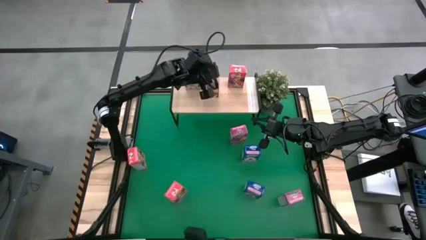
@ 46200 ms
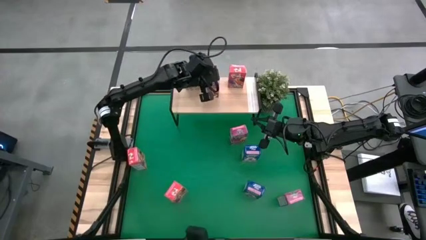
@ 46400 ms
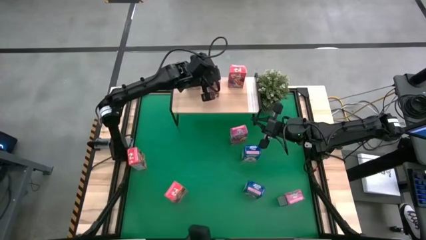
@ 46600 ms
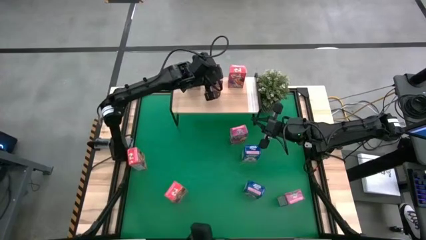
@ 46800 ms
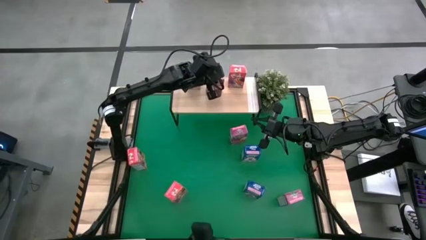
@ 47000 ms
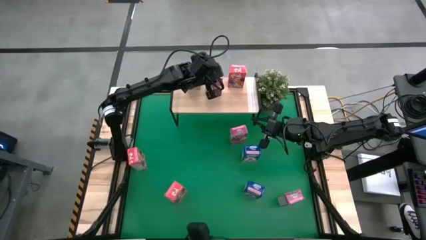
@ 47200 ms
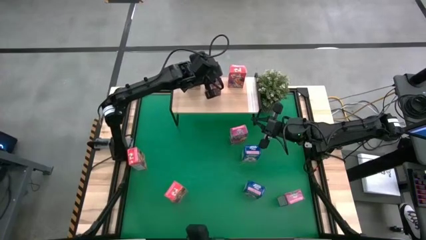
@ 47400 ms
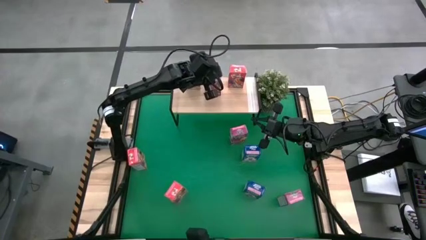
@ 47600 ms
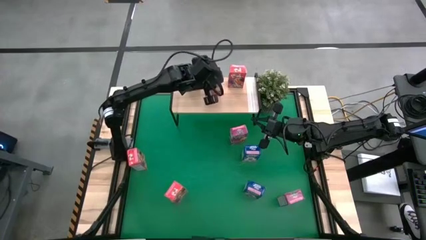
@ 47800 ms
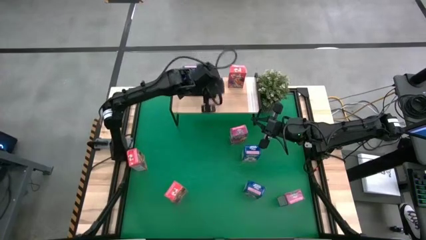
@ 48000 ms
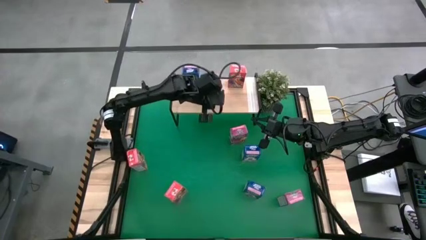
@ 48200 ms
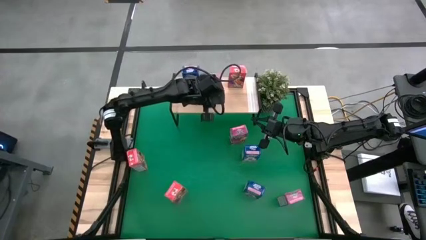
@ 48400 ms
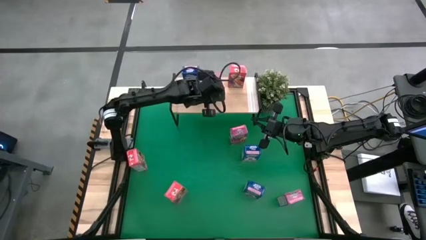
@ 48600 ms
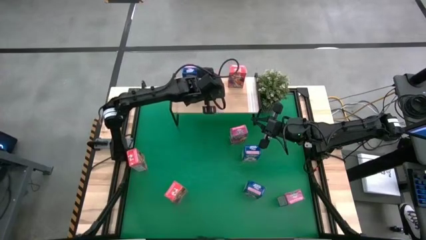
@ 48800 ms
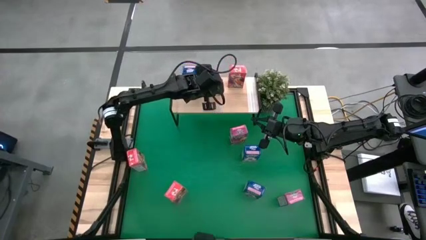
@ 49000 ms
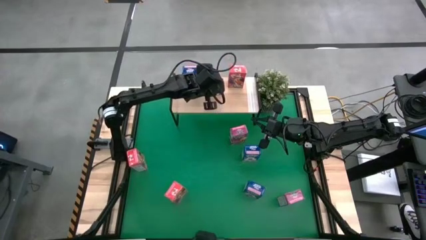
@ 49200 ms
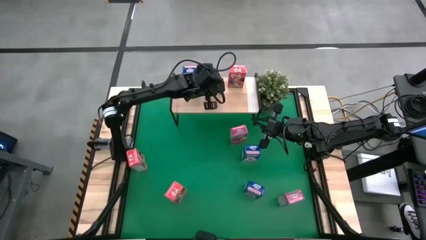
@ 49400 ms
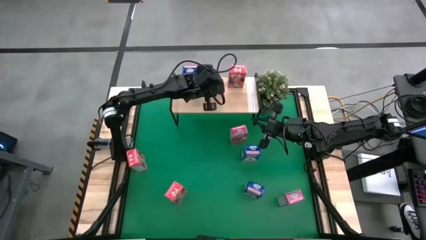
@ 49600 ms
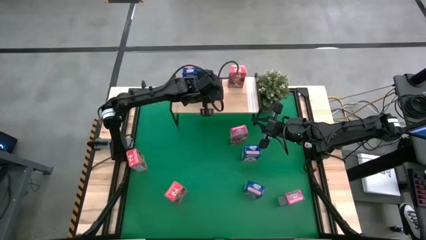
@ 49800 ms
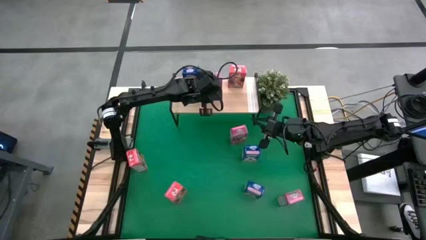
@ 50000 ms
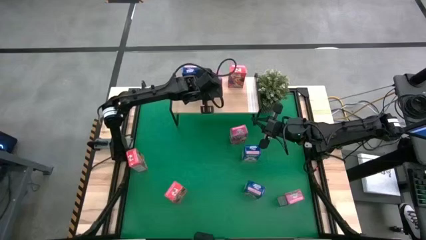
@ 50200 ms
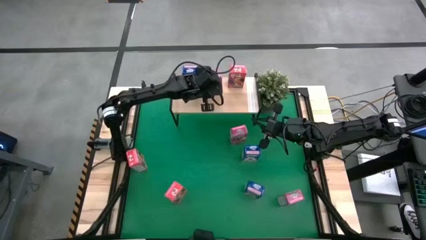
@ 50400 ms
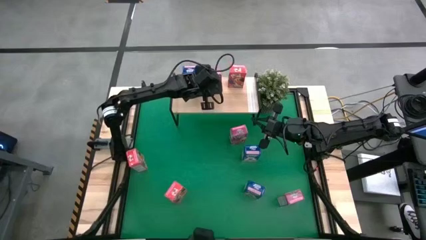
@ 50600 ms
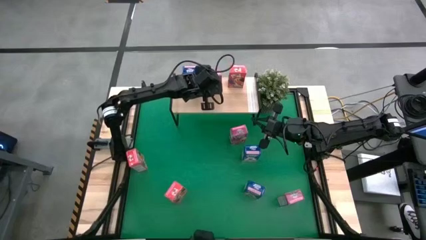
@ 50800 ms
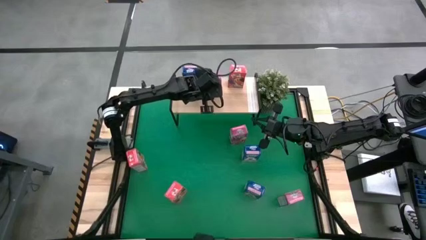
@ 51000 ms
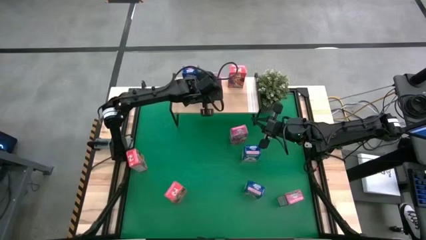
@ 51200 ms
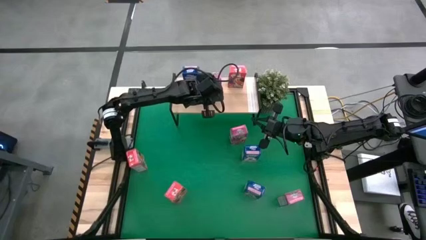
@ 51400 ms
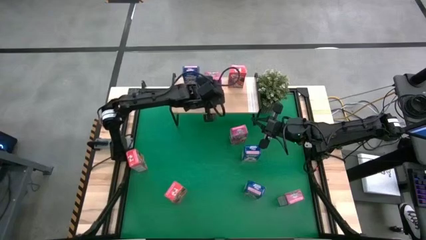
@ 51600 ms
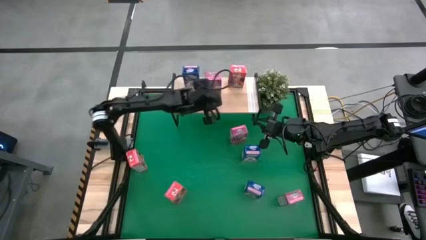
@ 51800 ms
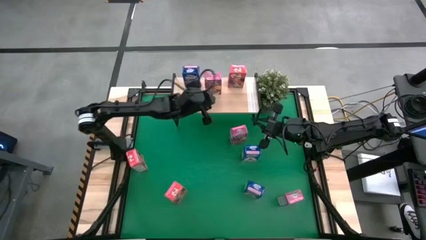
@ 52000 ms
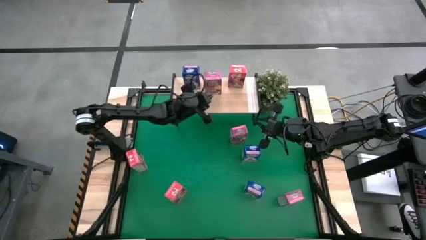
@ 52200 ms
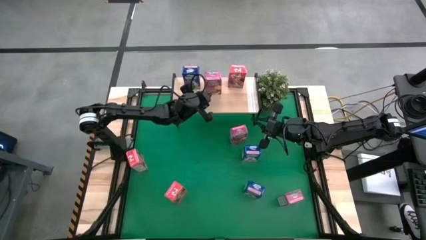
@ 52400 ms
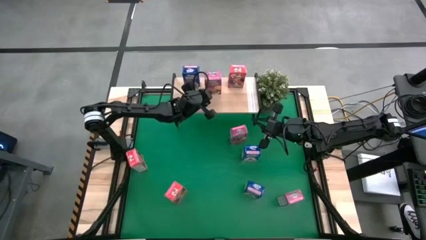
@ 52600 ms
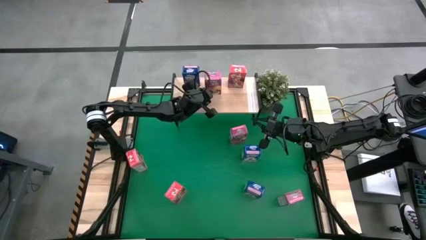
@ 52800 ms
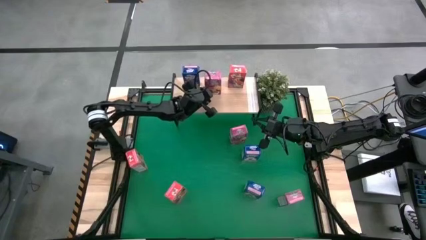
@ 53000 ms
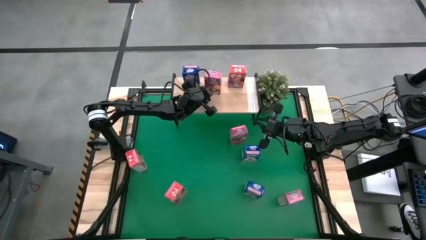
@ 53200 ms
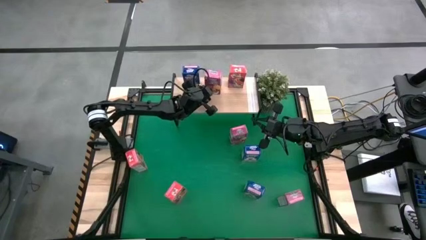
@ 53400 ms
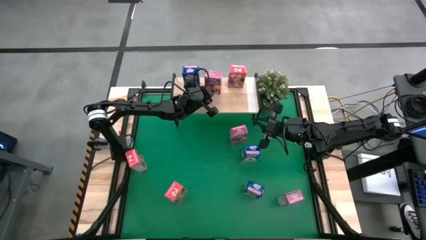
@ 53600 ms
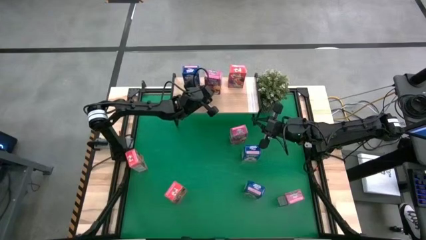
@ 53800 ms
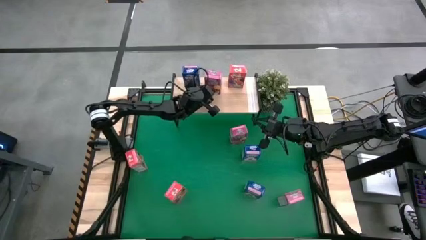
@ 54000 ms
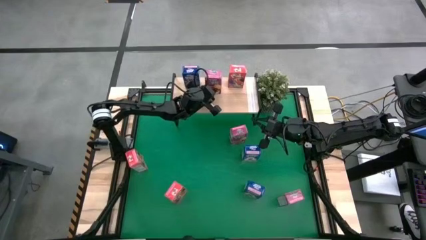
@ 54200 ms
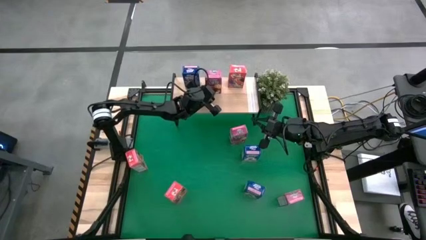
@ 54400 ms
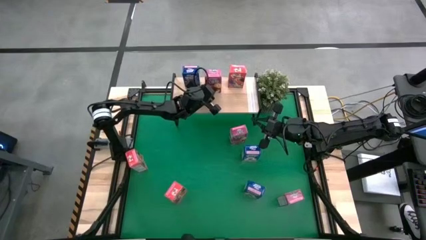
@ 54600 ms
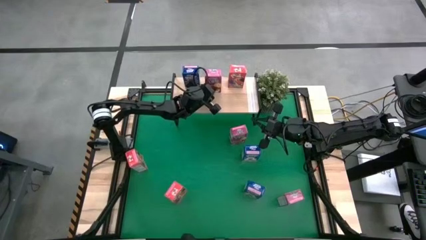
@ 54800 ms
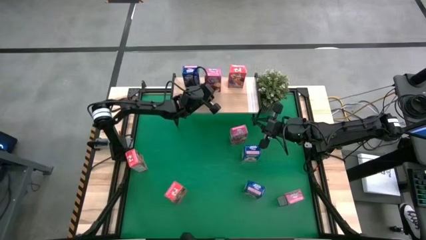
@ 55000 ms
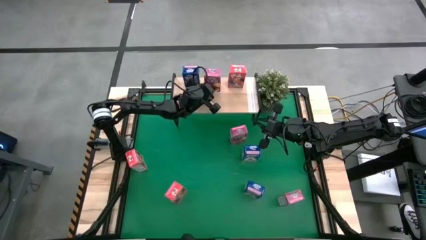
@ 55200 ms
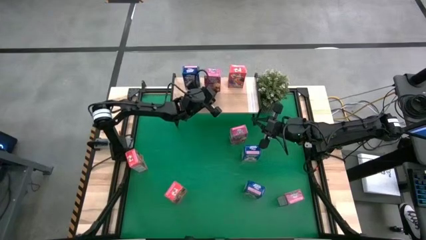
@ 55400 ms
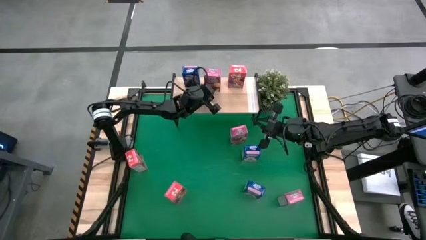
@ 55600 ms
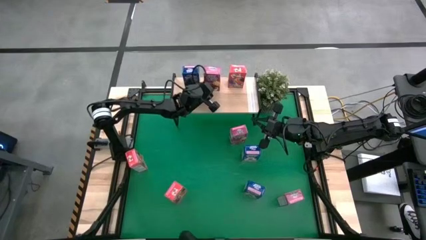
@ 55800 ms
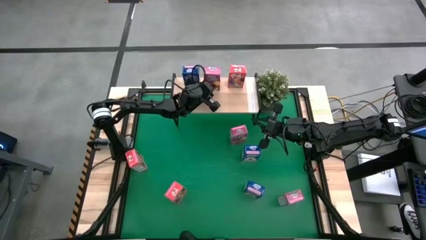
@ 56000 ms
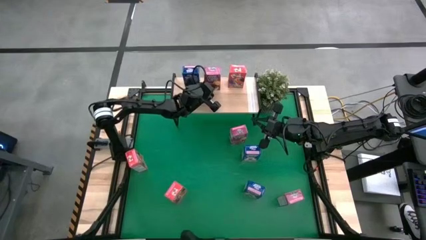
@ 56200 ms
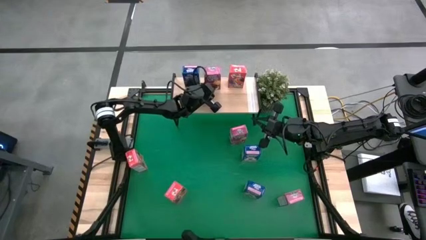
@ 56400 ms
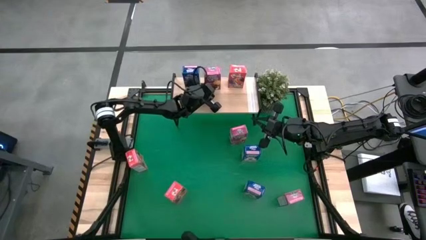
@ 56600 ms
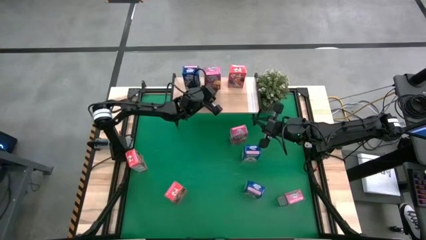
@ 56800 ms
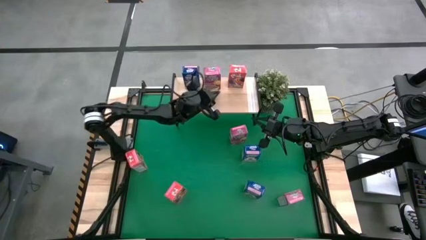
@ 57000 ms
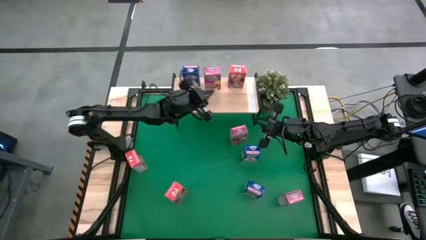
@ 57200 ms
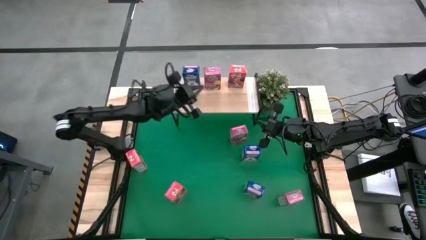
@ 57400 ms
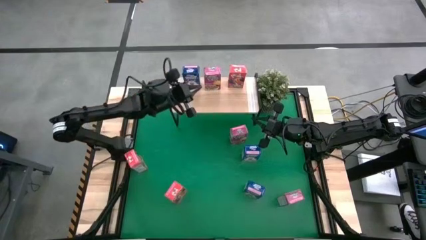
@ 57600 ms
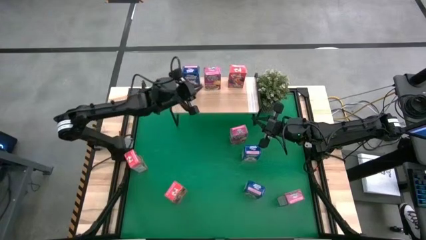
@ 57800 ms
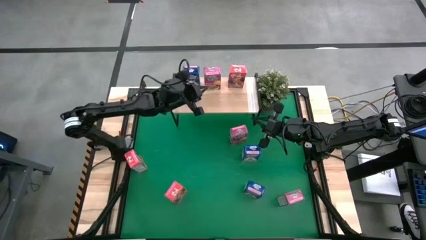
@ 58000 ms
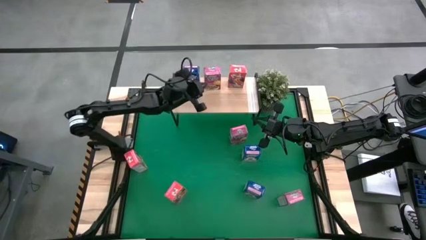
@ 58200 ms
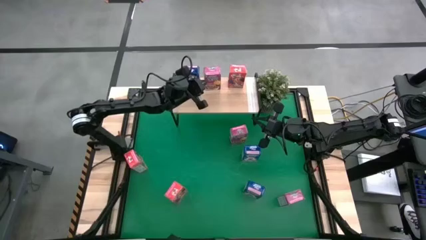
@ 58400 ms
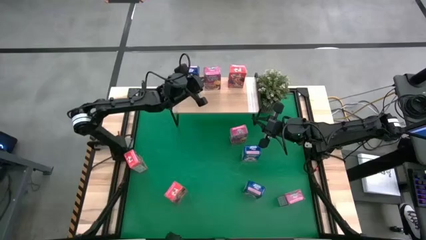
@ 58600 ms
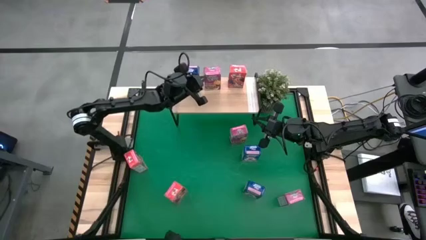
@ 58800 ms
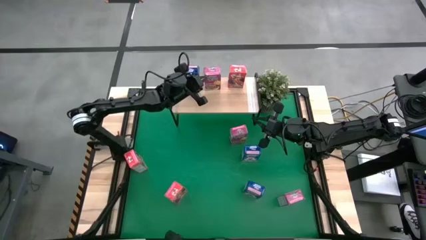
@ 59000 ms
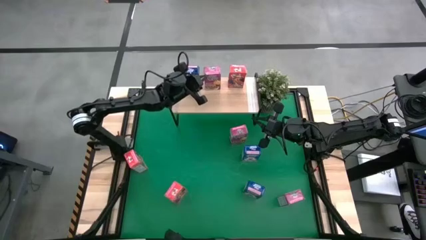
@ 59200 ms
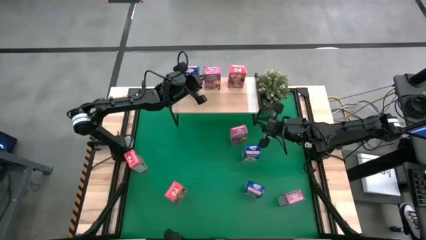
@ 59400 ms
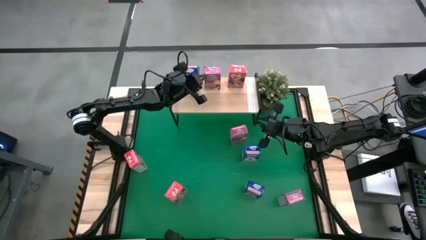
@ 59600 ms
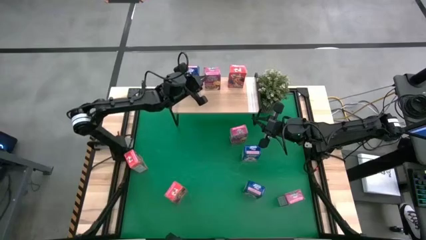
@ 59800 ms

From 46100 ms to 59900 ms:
Task: Stack cereal on shelf
Put the bottom left violet cereal box on the shelf

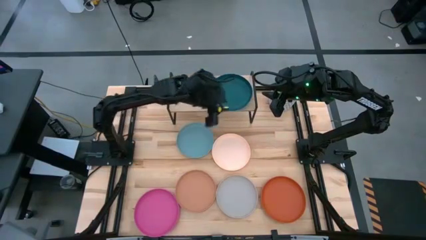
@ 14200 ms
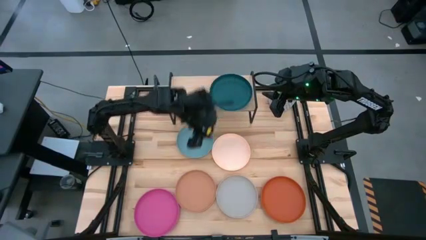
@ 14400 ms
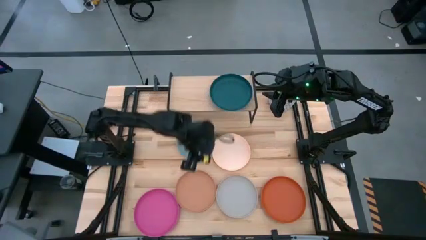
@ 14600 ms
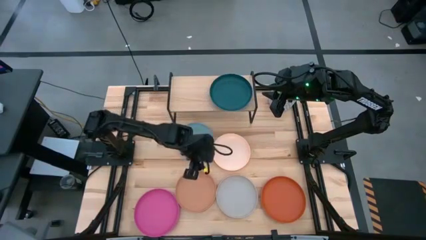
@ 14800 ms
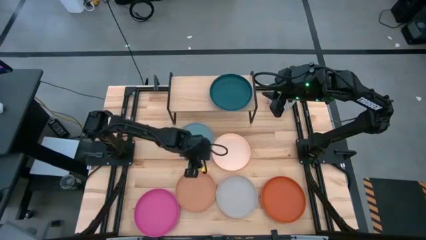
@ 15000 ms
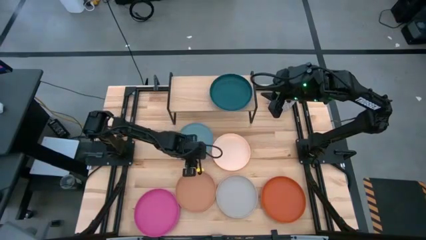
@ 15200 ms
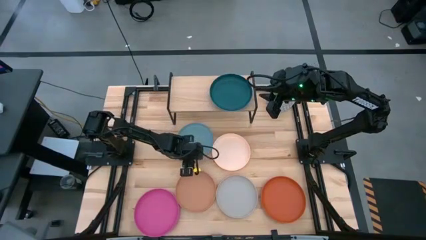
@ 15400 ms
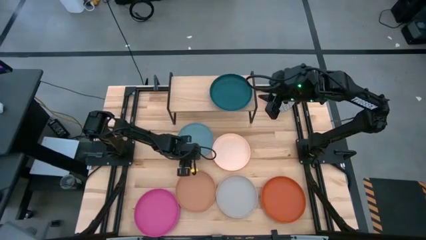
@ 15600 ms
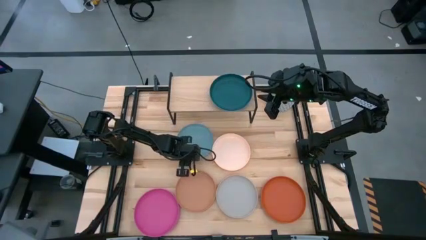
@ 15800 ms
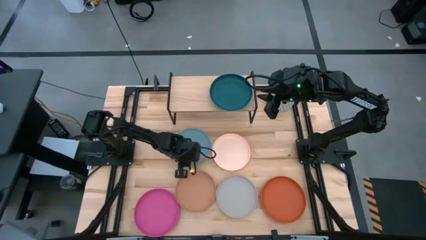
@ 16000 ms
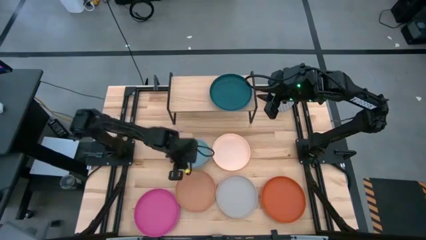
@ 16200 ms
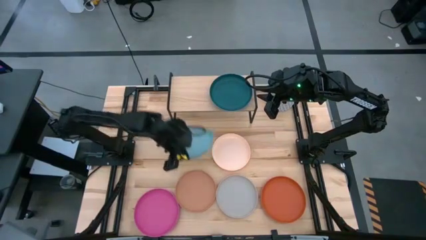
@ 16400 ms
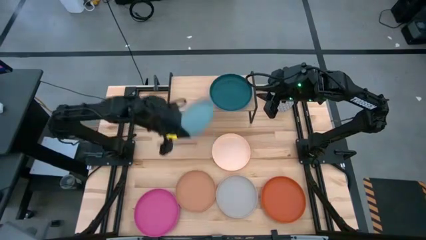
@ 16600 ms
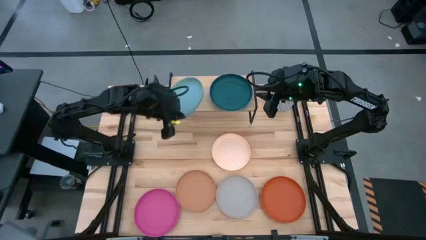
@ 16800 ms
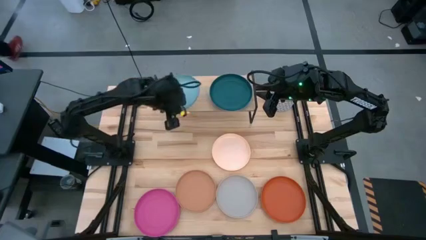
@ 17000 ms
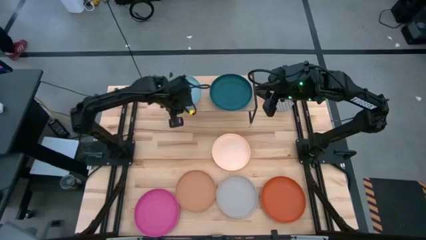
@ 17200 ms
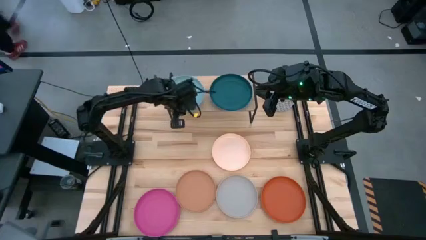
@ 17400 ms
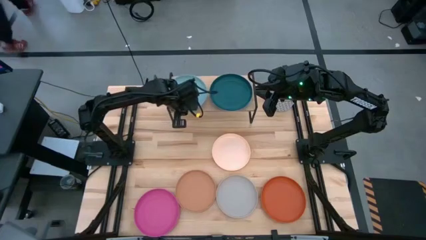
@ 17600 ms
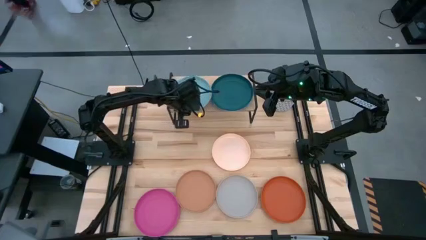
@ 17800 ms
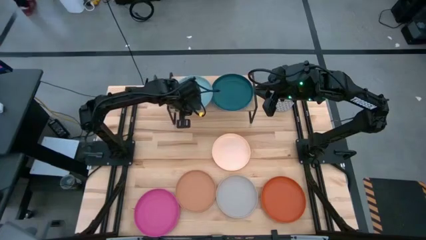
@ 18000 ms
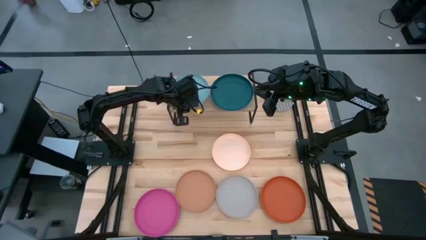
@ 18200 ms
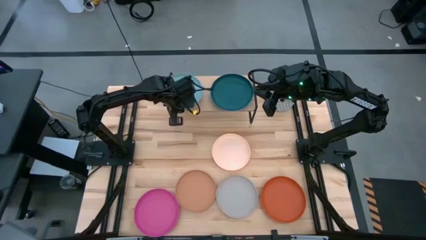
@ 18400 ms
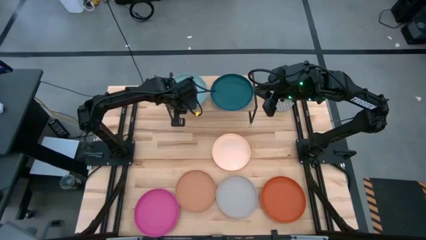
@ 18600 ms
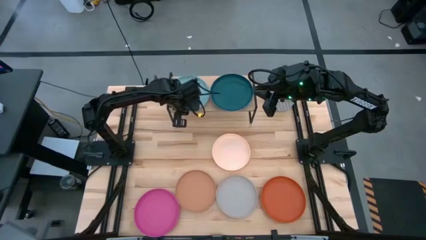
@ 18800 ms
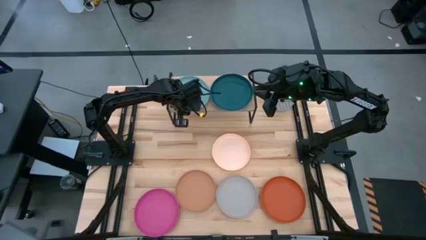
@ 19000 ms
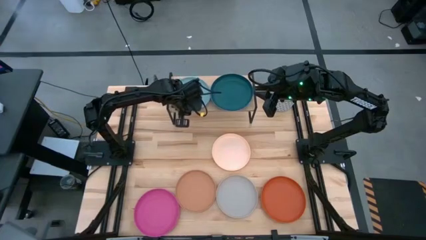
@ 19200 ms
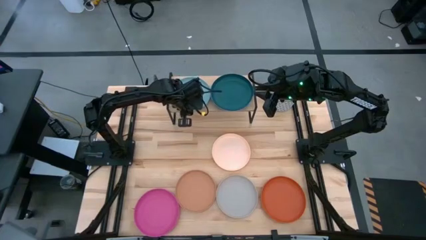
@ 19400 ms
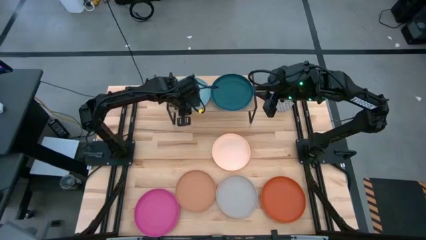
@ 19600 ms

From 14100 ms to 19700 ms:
Task: Place and stack plates onto a shelf
Put the light blue plate on the shelf
